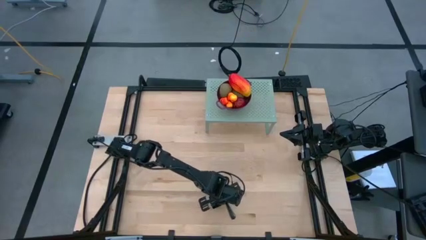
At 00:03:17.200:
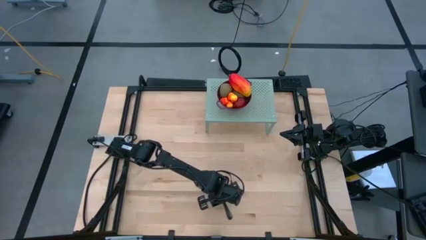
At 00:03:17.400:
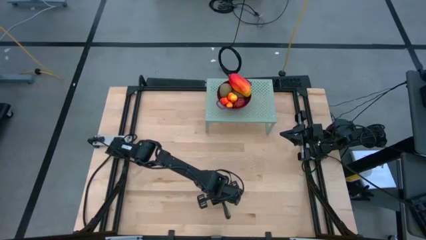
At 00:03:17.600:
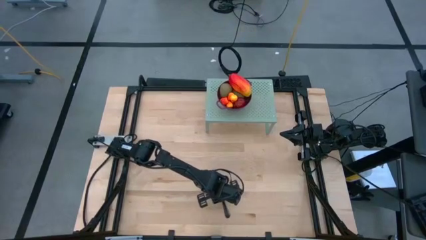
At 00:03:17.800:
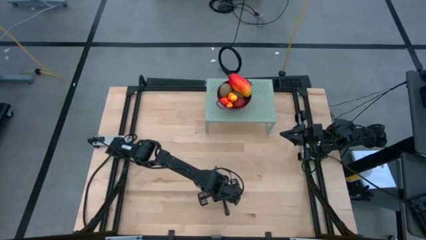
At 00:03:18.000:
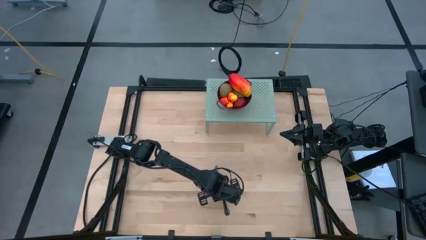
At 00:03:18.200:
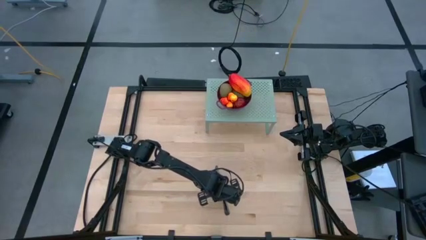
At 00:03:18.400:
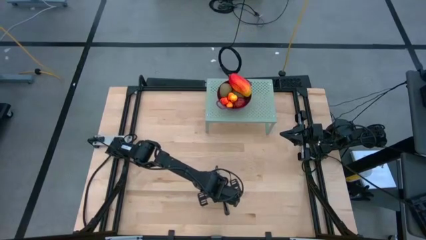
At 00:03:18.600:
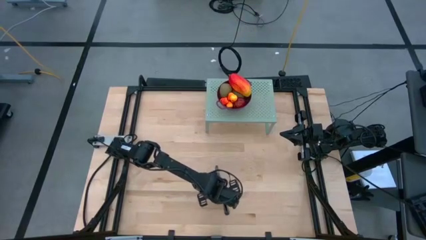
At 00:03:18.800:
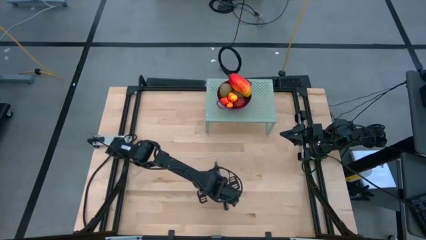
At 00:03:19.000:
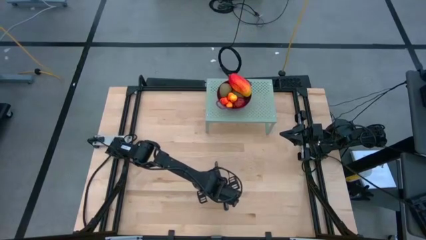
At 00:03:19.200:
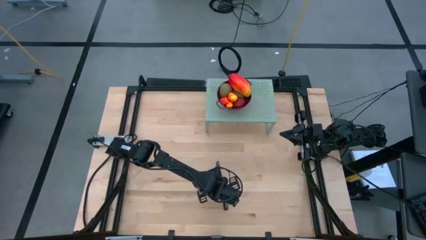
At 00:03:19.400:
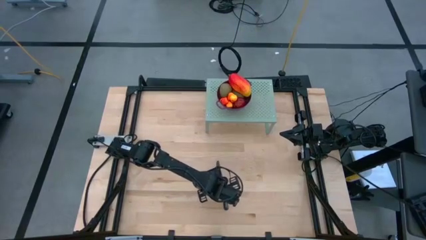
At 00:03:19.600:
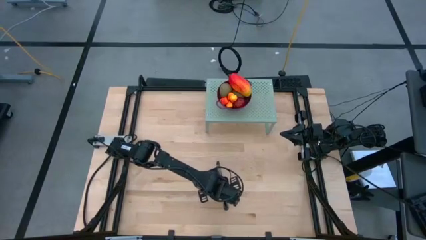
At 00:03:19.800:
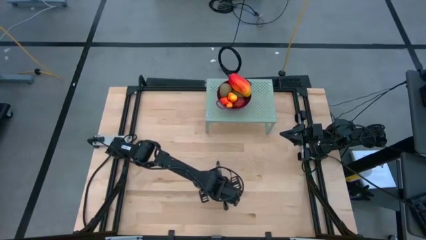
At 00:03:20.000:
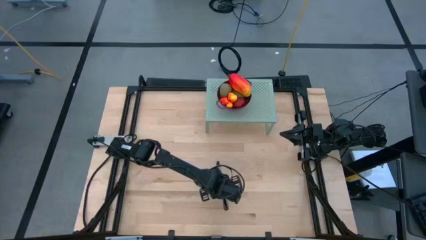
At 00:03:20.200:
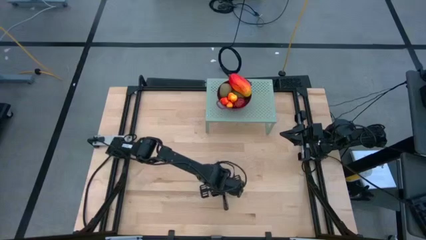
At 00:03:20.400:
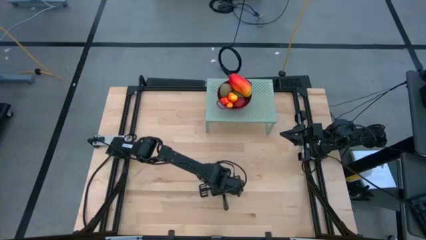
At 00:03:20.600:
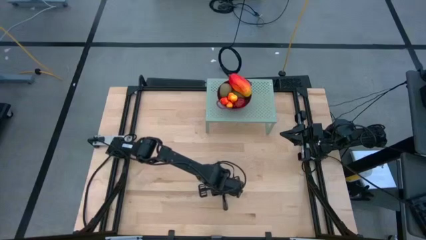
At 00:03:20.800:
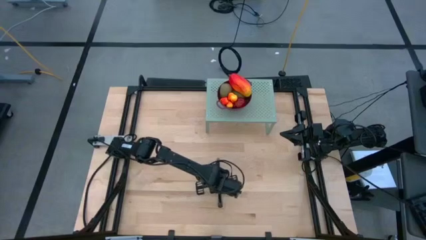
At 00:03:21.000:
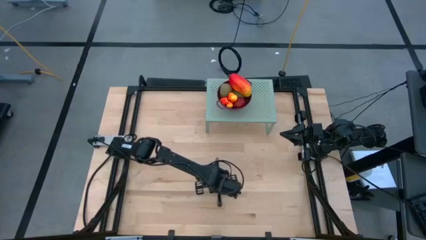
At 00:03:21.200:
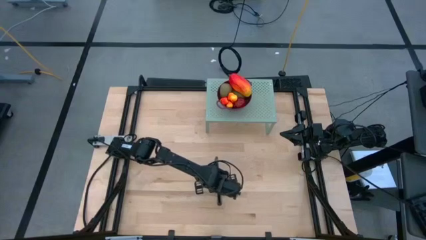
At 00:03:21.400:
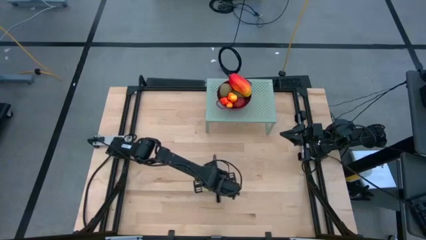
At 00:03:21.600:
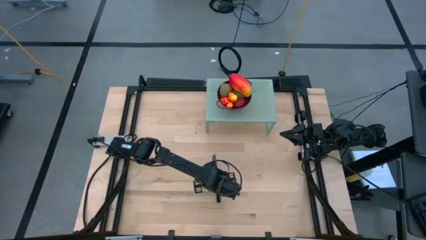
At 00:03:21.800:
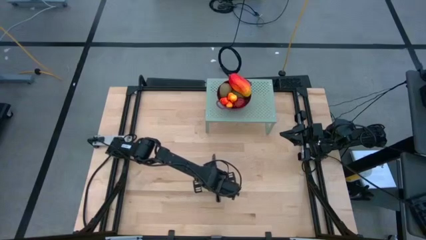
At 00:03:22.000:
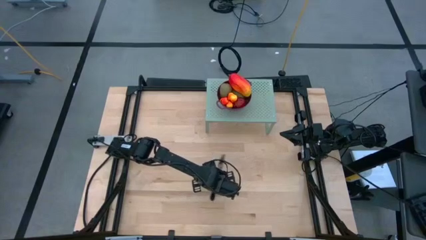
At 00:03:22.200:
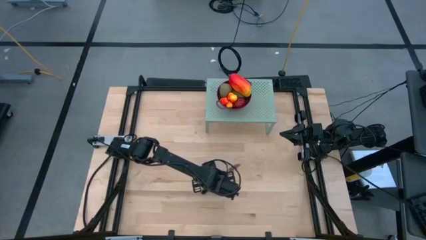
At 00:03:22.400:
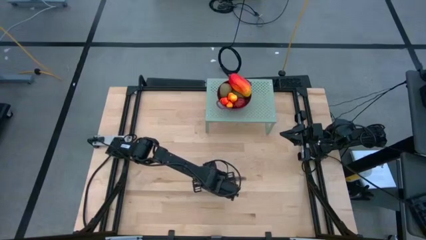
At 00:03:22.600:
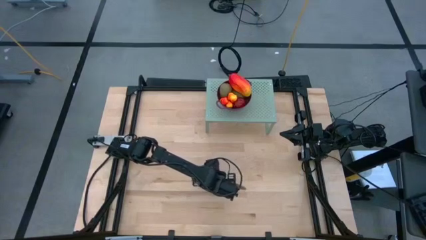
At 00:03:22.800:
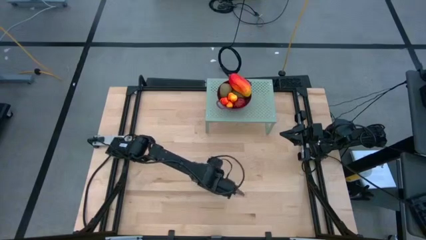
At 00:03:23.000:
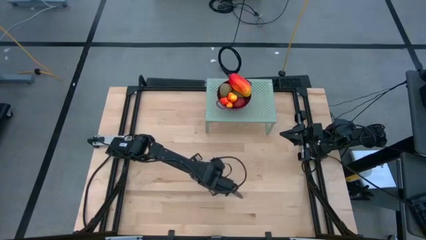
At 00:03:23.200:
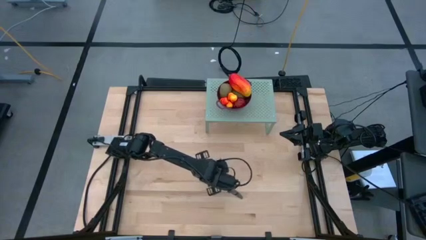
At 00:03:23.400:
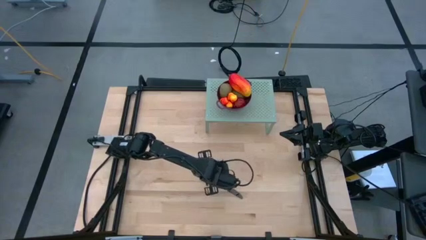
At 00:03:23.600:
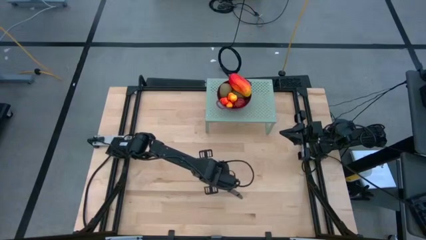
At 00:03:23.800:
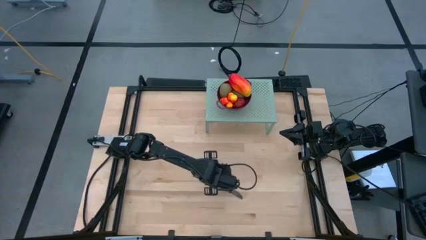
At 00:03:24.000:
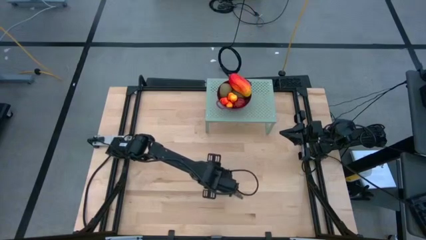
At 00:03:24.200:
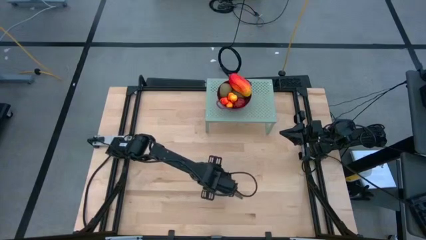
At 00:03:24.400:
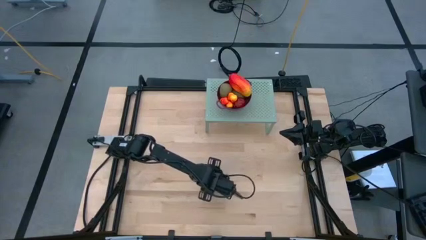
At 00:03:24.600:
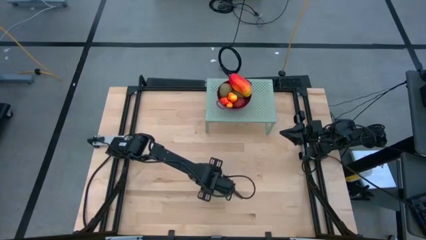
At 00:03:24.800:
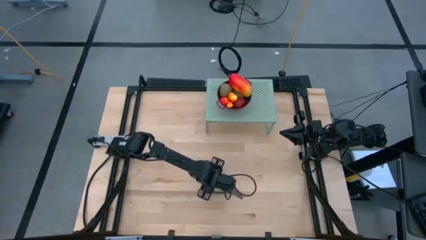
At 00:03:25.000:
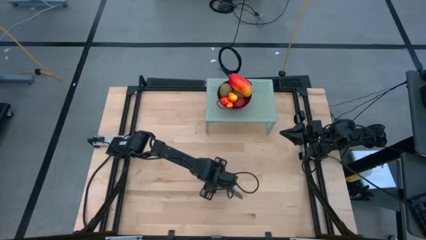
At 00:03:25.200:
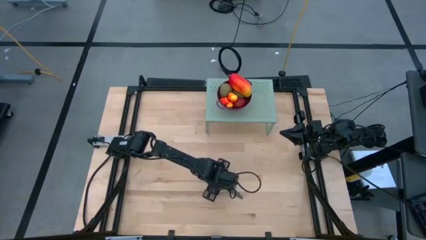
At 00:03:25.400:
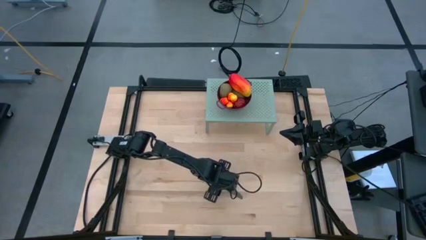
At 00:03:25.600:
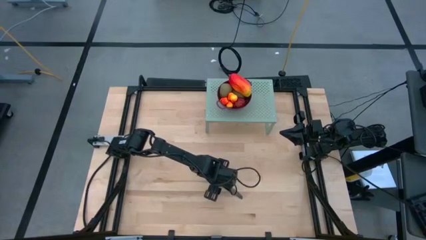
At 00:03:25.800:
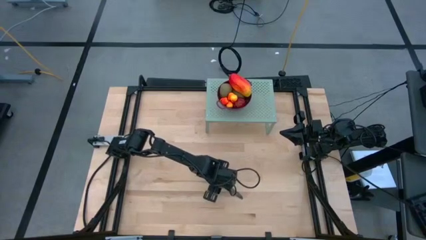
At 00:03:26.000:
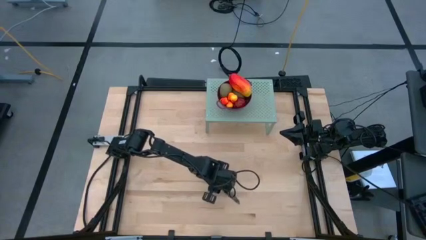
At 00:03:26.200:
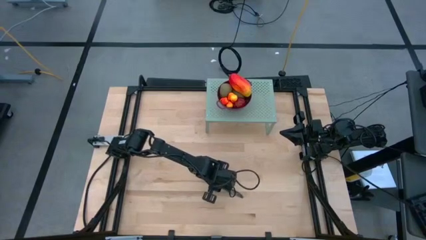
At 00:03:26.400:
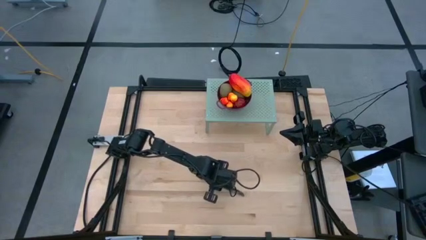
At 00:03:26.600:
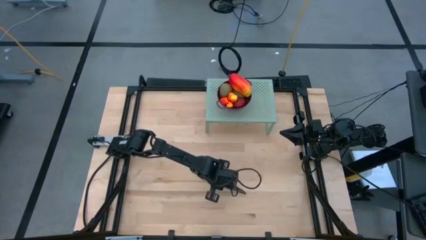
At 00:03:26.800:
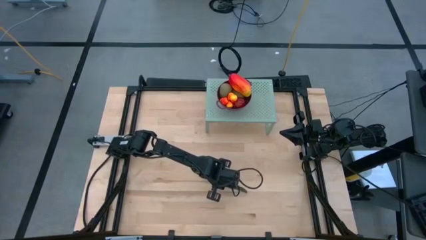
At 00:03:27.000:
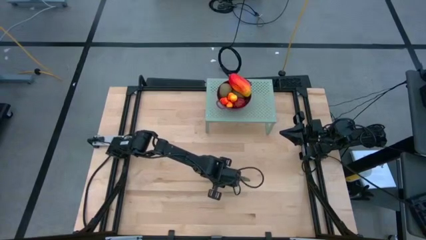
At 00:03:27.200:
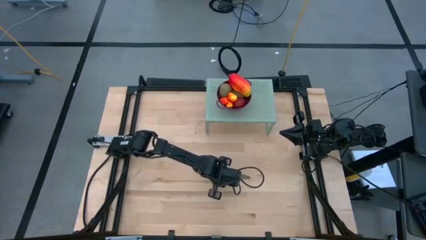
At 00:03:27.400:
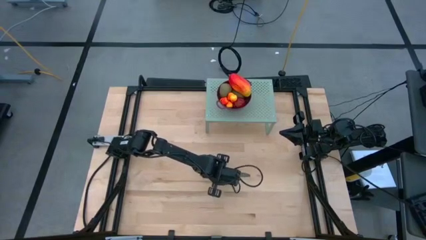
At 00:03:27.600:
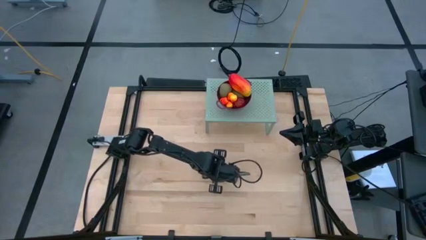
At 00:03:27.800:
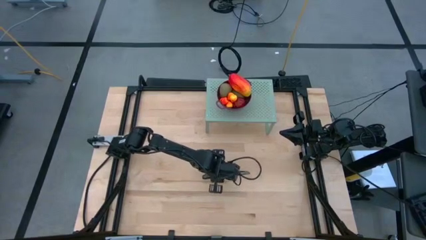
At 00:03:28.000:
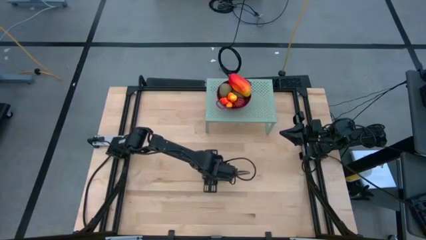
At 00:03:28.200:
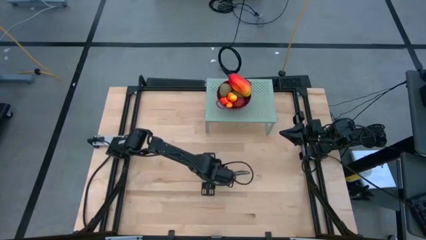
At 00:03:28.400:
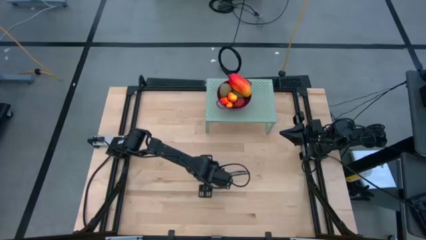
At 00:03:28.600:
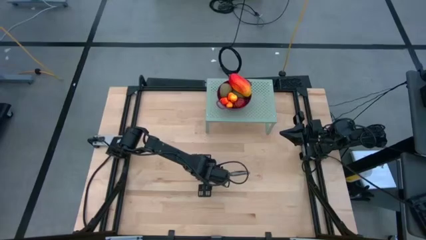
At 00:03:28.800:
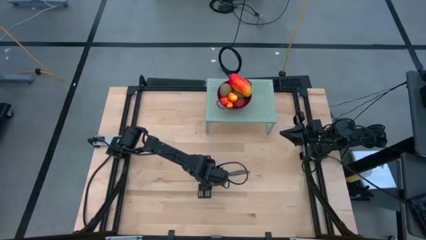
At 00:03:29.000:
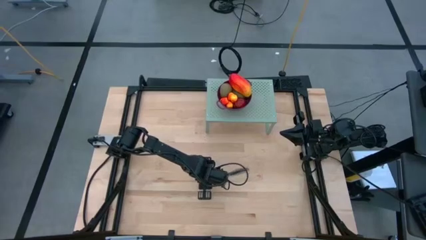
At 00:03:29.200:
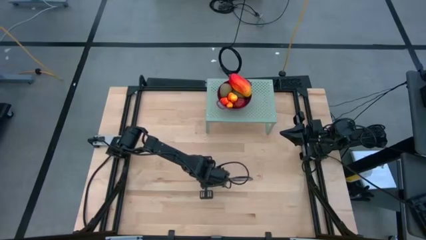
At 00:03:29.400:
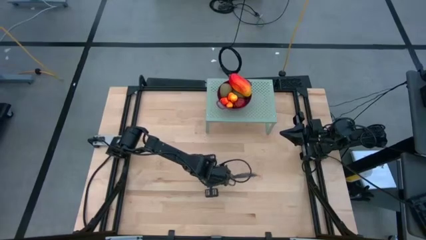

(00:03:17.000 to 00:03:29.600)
Task: Pick & Place Fruit
Put the knife on the shelf

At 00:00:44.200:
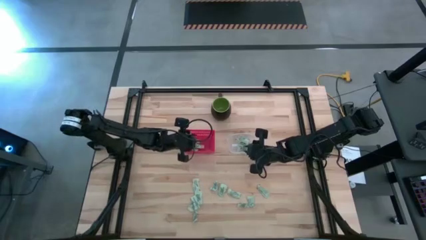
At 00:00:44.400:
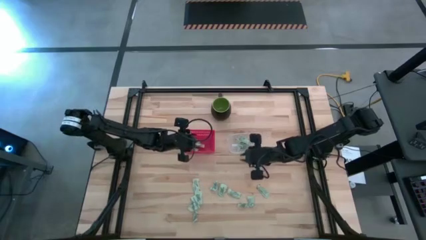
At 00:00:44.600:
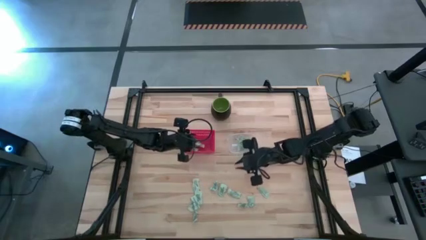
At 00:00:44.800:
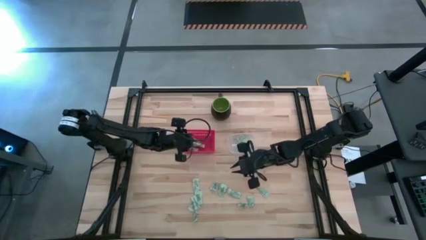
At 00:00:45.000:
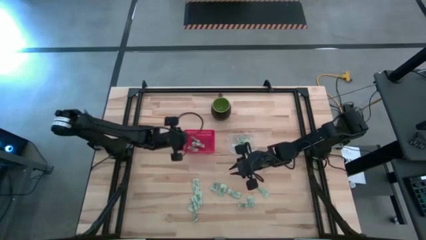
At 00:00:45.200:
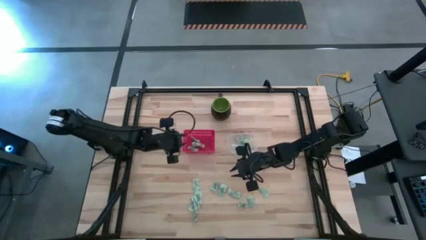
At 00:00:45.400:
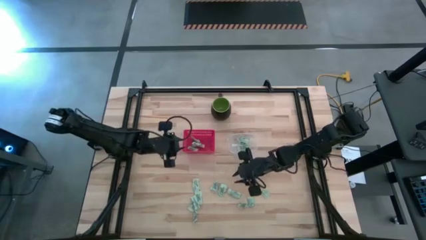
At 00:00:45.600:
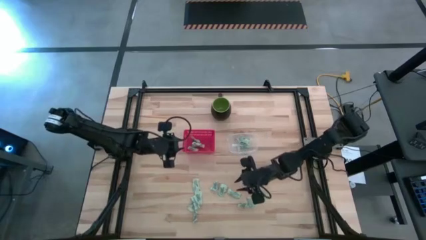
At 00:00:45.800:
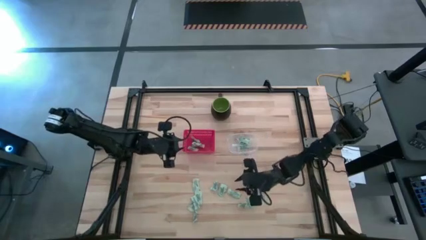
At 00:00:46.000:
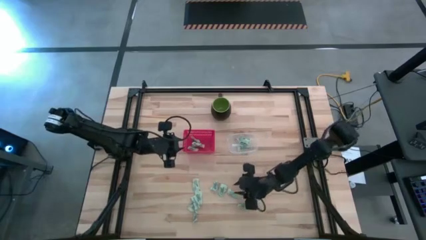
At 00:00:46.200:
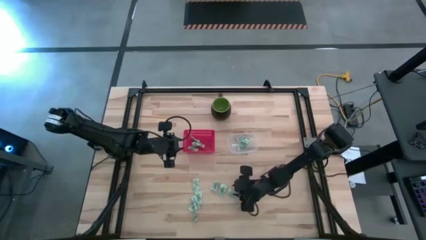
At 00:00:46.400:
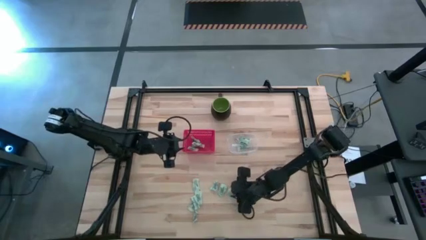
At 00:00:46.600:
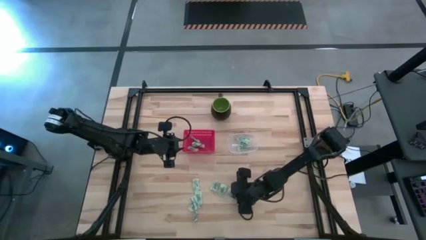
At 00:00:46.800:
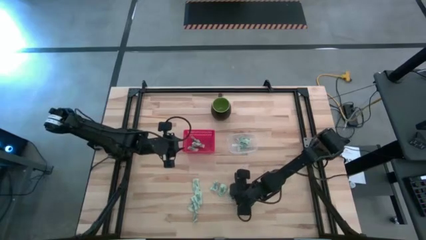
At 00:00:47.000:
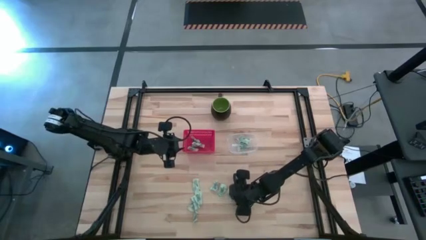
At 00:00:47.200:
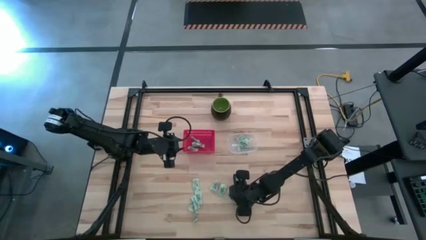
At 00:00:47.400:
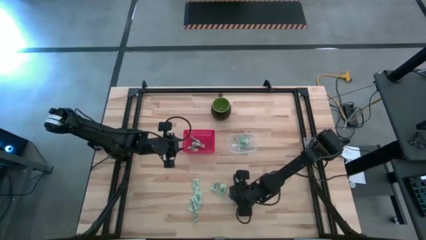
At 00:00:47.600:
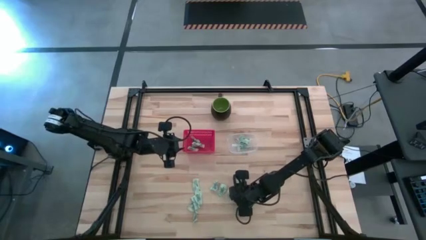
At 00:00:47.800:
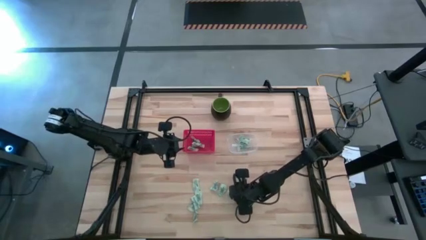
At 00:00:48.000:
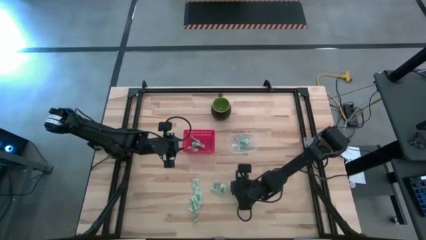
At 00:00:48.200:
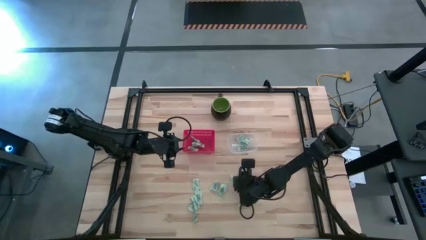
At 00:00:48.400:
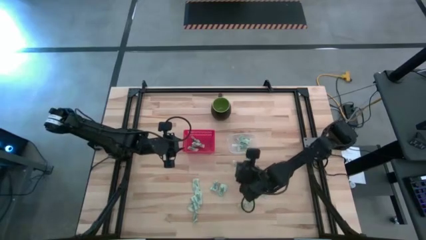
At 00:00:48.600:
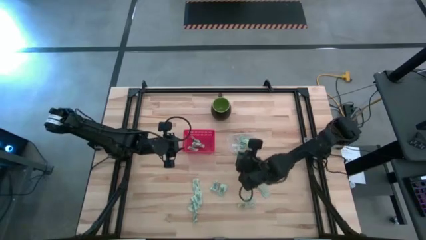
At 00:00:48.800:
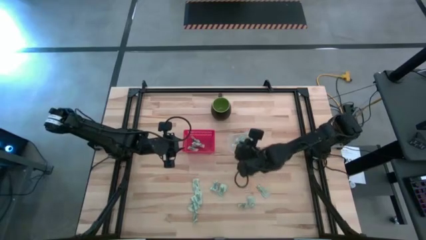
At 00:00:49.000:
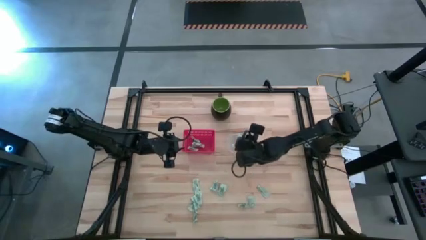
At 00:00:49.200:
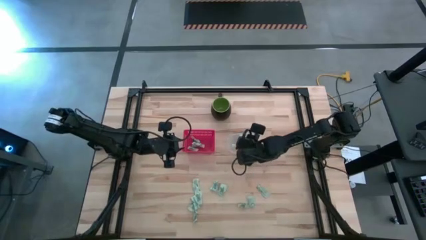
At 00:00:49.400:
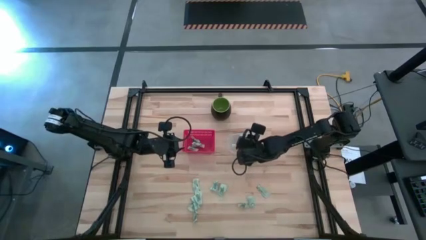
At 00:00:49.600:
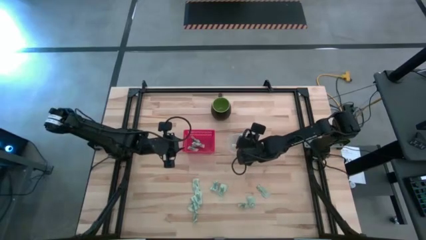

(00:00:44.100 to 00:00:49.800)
Task: Pick and place items into bin
Put the stevia packet into the transparent bin
